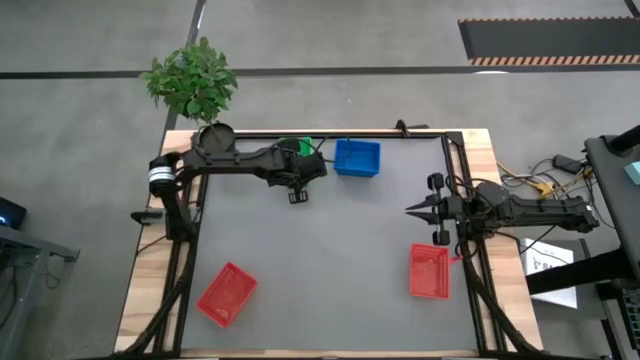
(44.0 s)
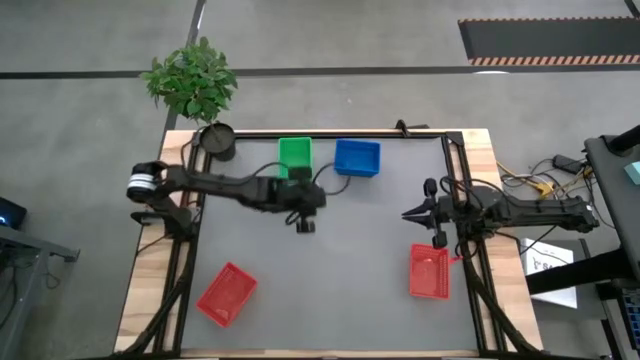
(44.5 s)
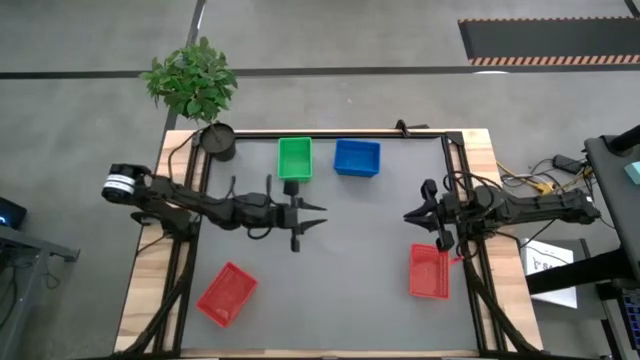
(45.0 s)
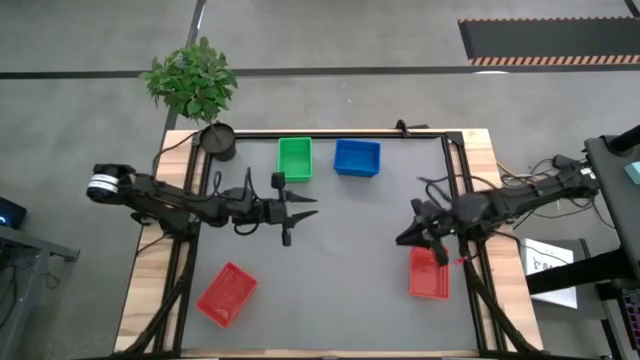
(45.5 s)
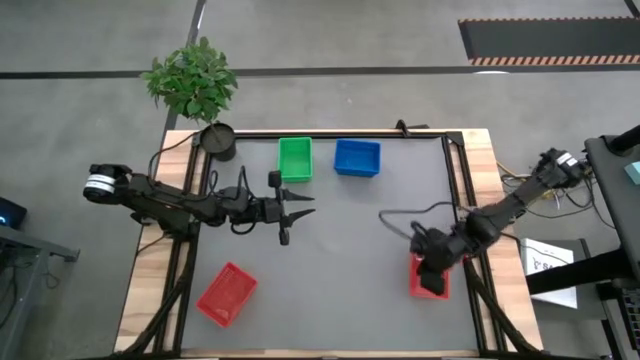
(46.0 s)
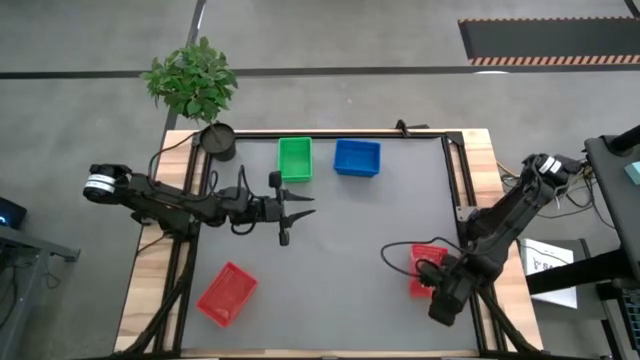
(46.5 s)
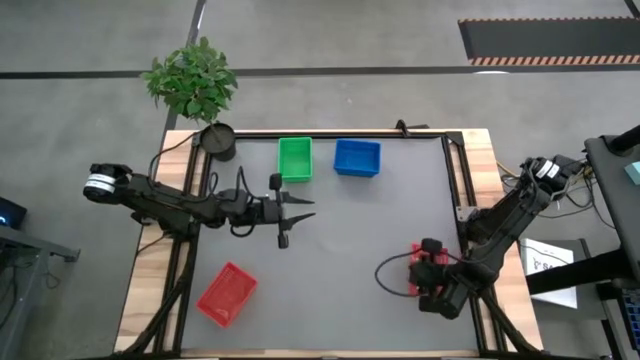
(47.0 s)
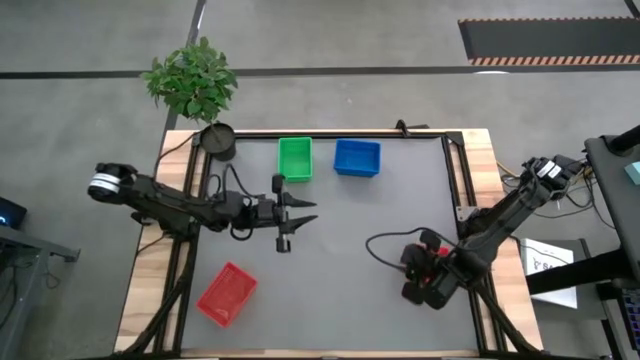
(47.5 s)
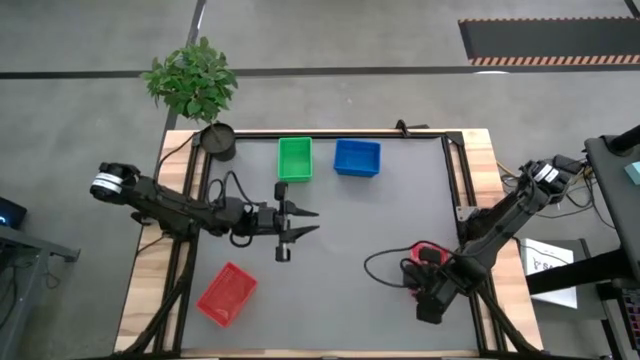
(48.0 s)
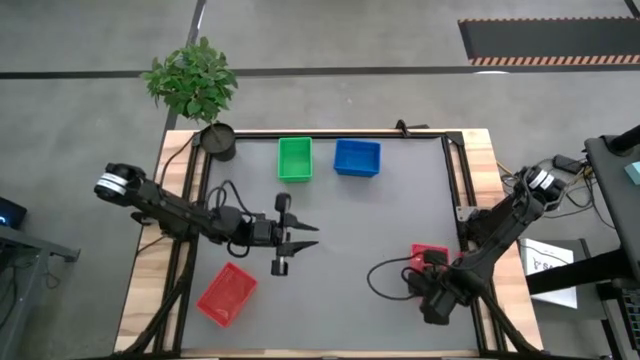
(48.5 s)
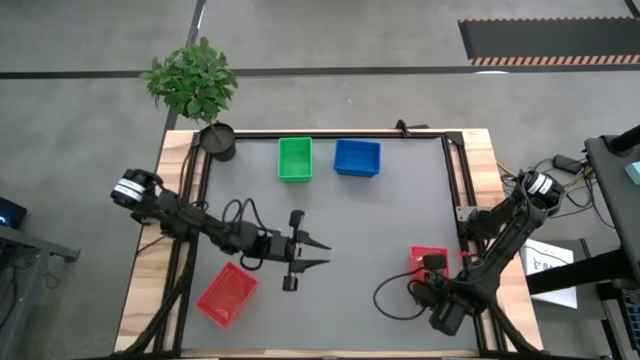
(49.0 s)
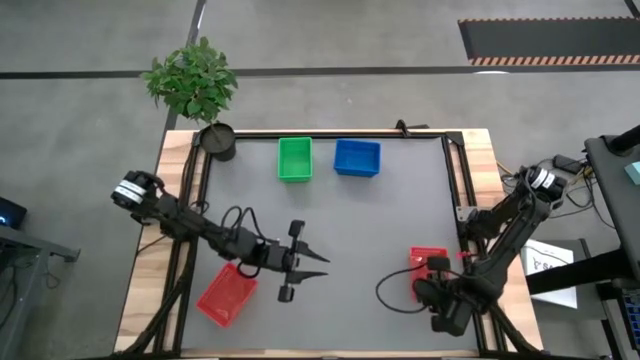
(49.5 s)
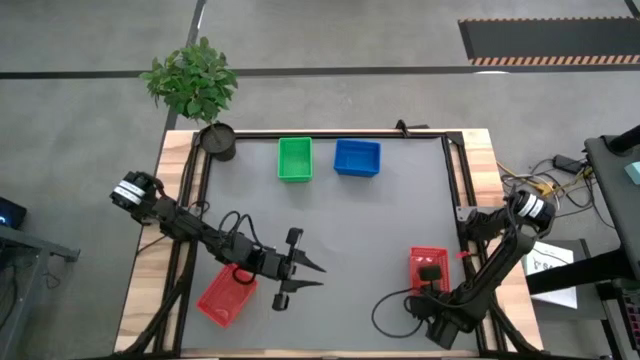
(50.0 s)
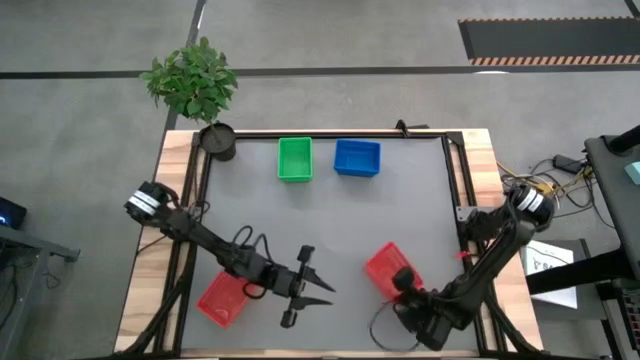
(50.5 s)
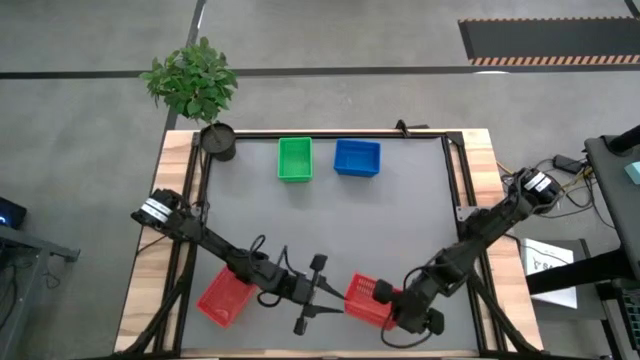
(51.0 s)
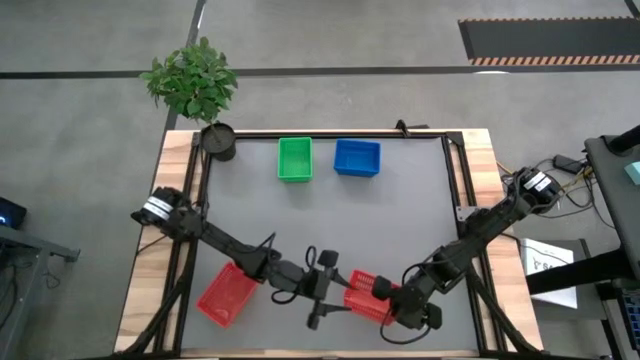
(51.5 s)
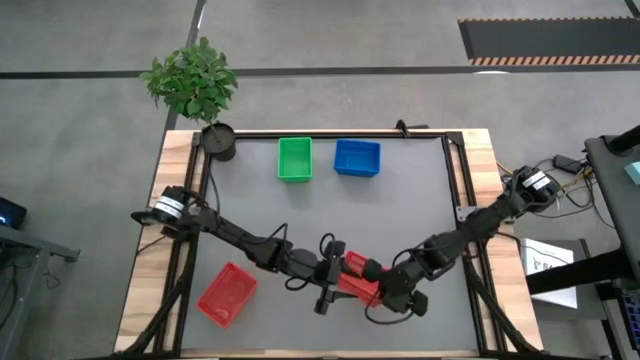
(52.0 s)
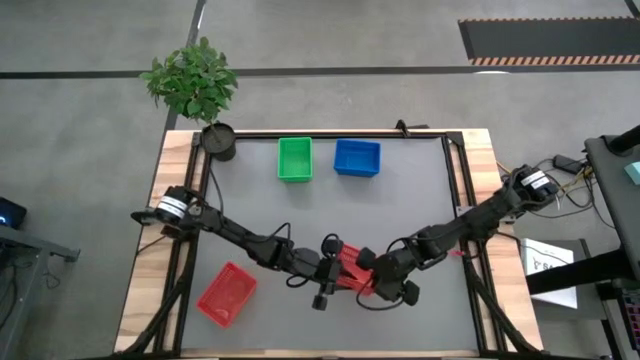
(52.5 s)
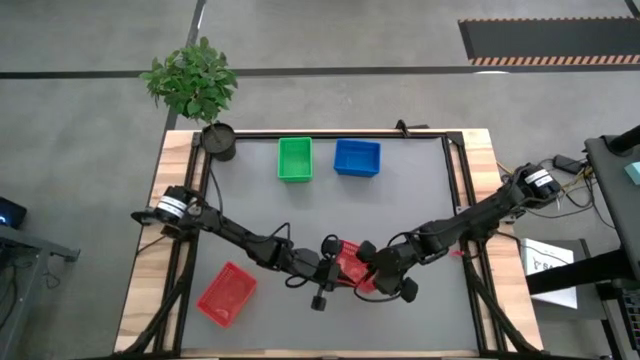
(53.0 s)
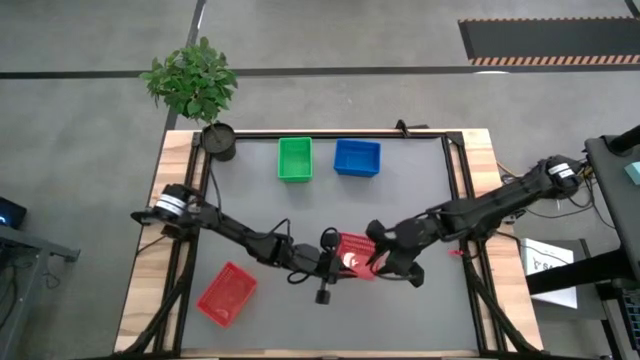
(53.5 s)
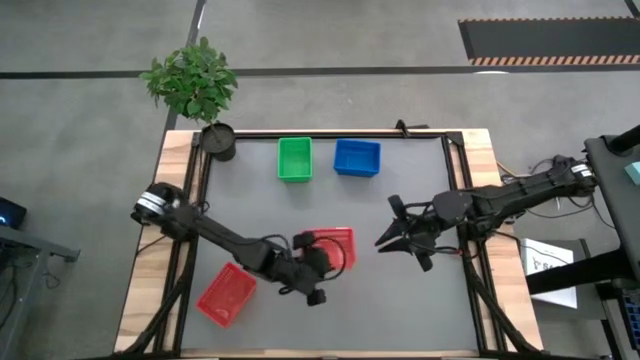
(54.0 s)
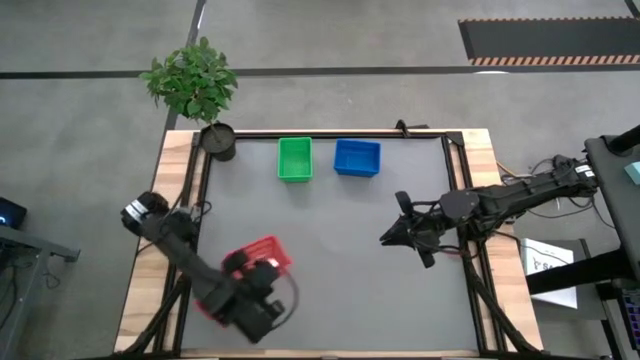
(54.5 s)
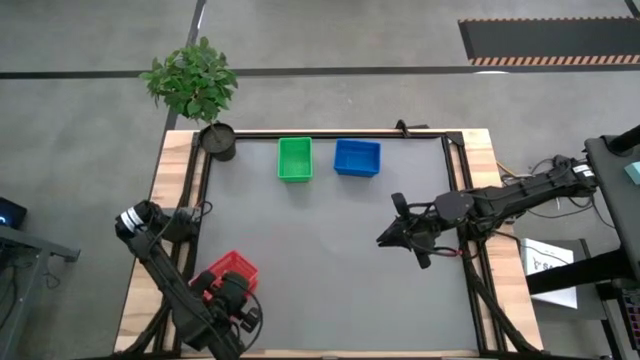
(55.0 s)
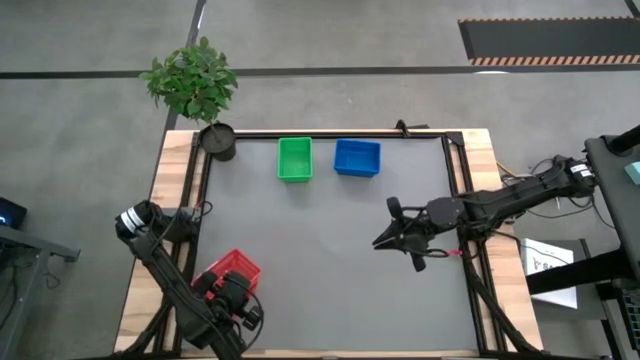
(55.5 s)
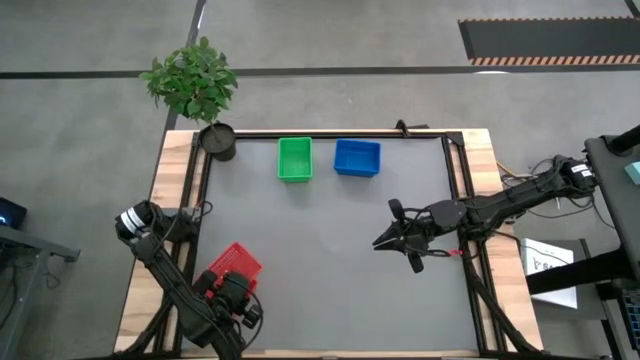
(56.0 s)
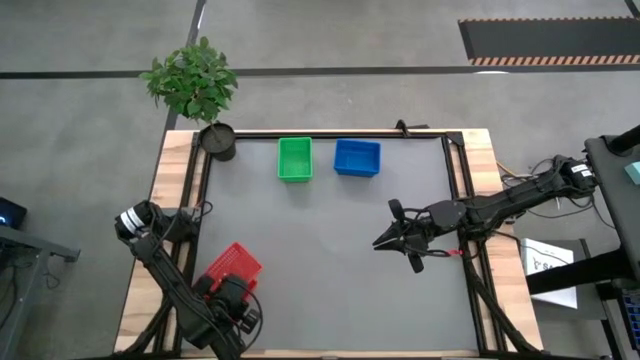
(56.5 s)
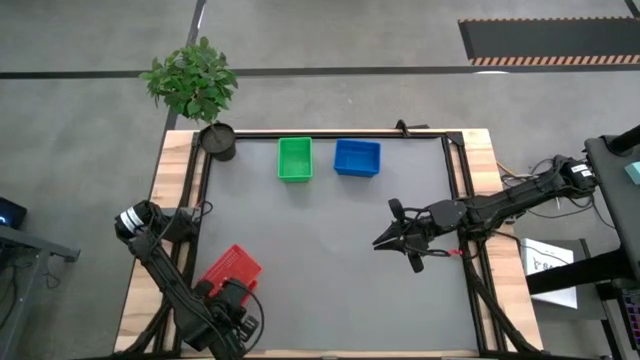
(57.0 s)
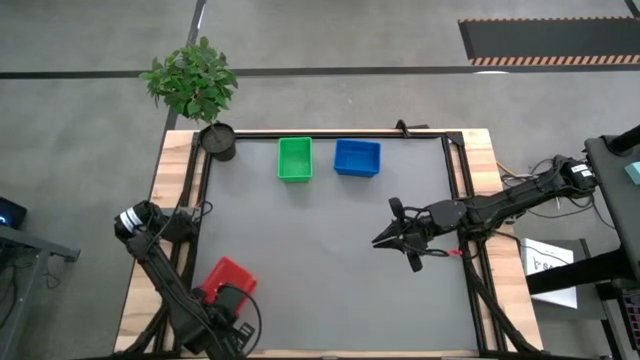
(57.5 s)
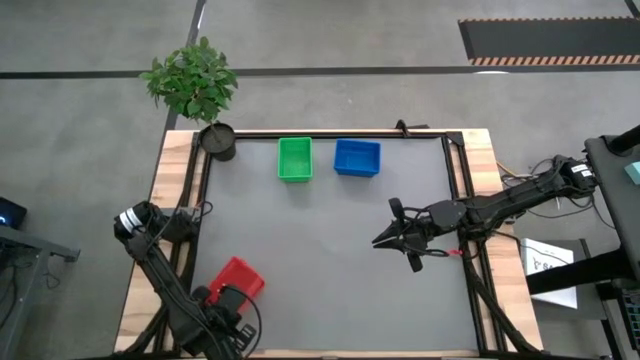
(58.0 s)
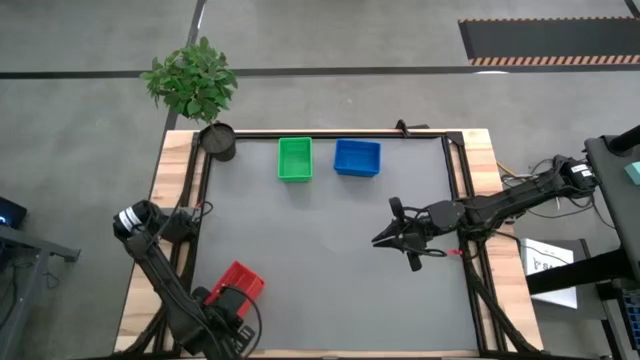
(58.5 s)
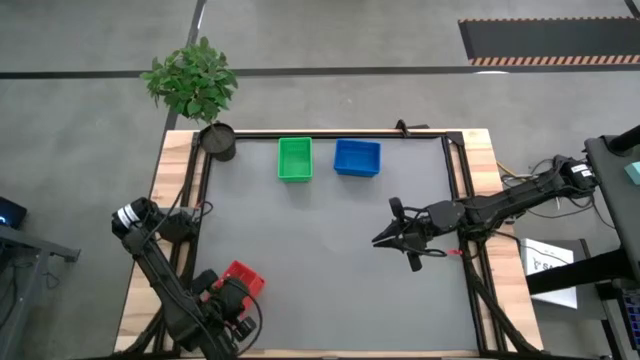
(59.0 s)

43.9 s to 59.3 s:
Stack the right red basket on the left red basket

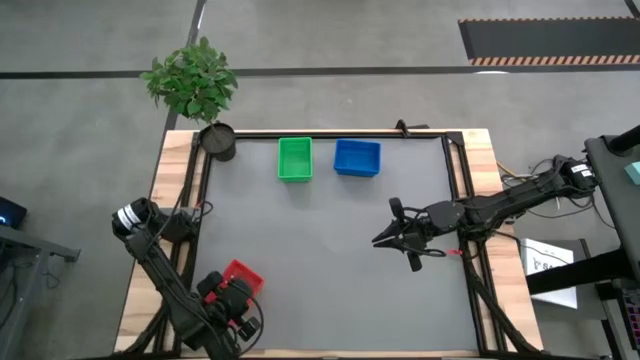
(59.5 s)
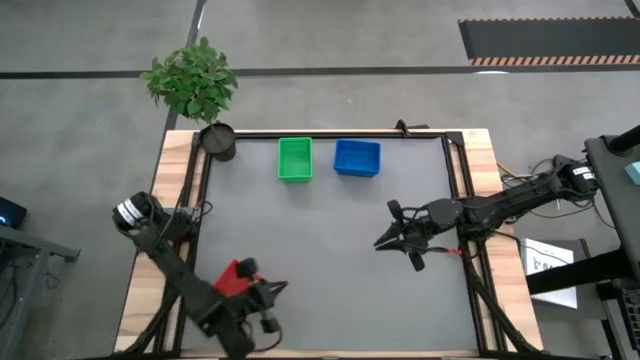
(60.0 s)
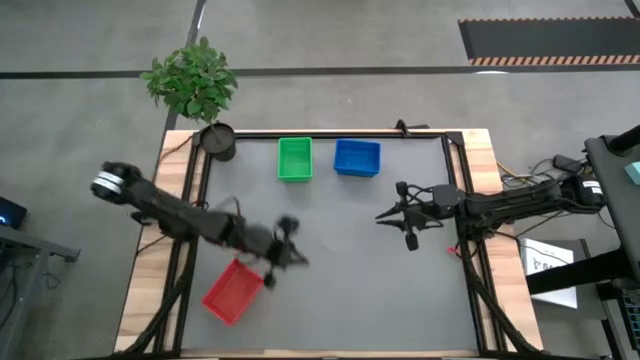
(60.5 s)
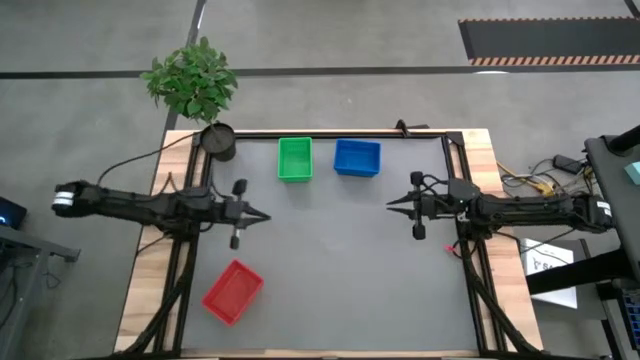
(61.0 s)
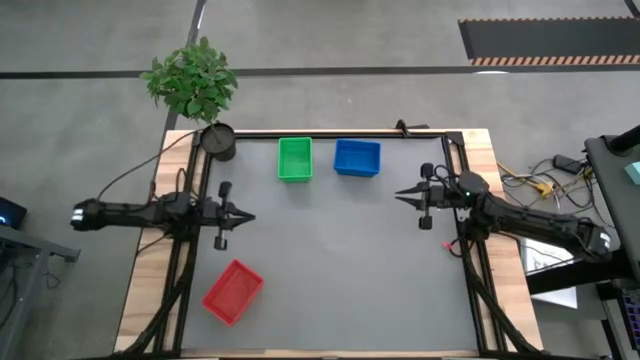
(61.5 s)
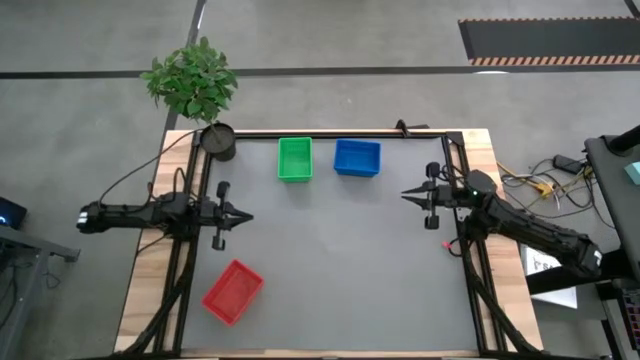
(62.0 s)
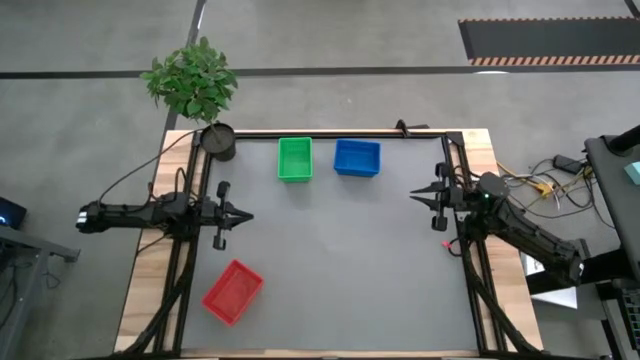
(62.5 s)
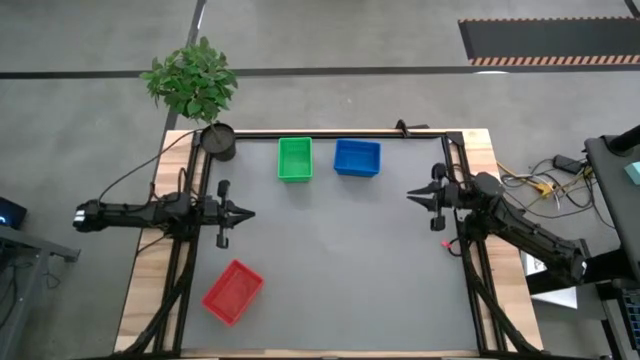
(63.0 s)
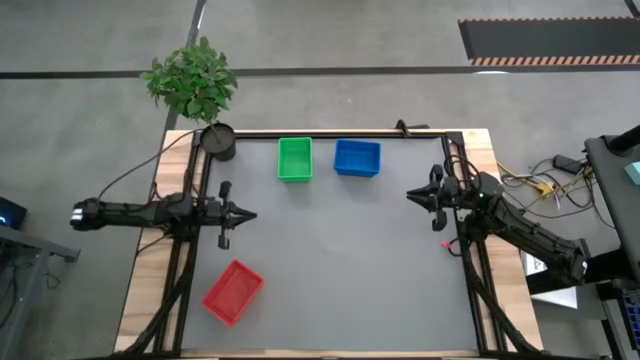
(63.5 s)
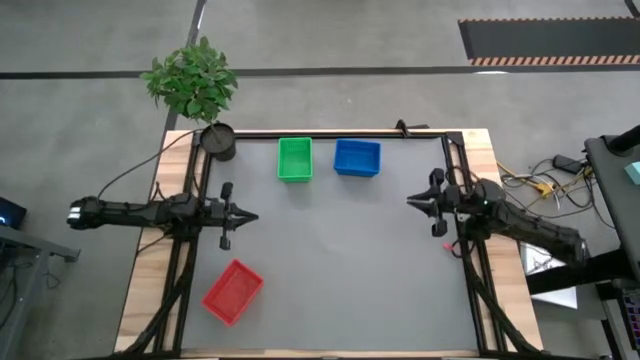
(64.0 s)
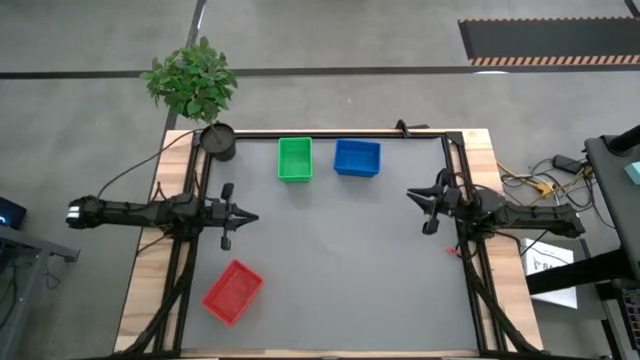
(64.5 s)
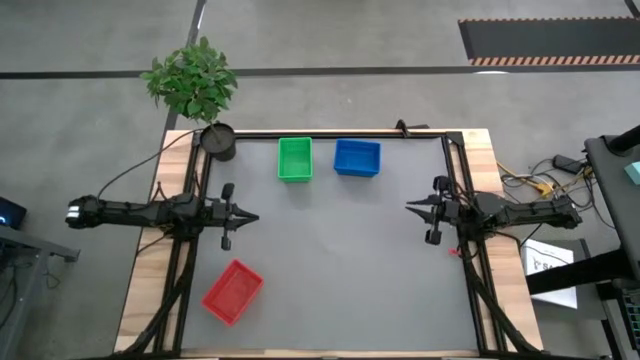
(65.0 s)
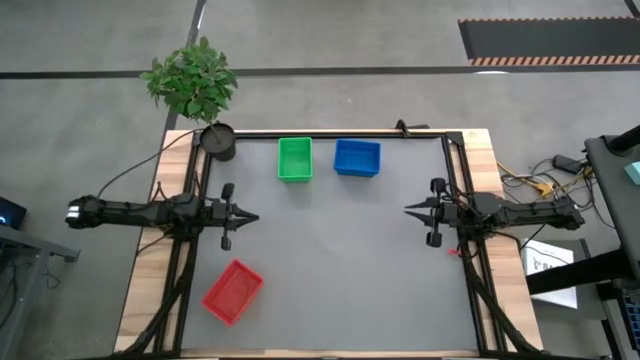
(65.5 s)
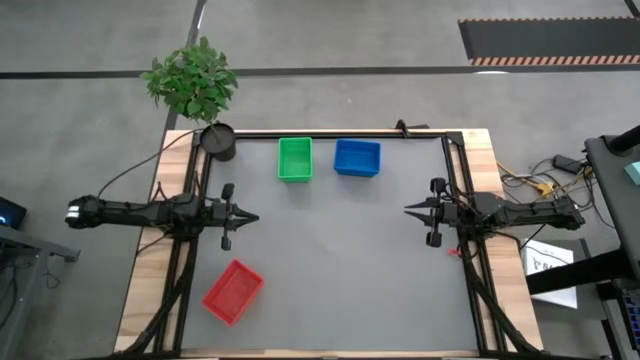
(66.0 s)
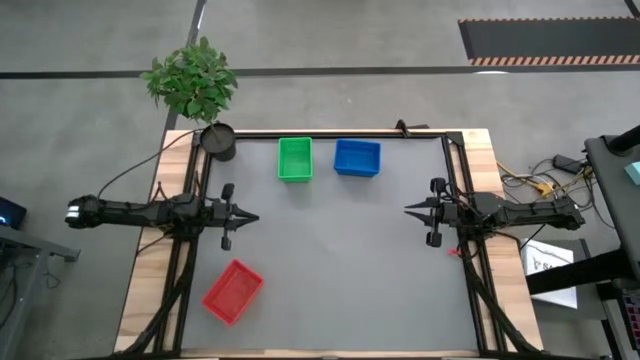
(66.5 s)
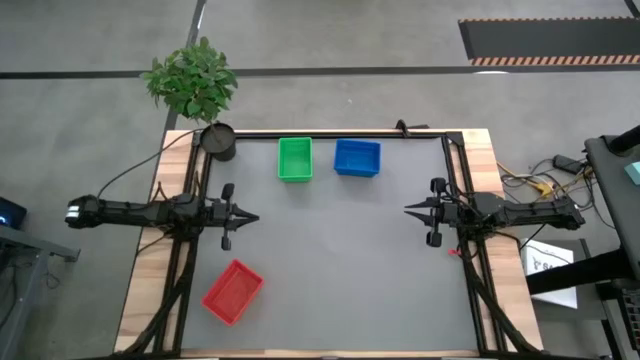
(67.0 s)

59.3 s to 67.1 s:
Return to Home Position
